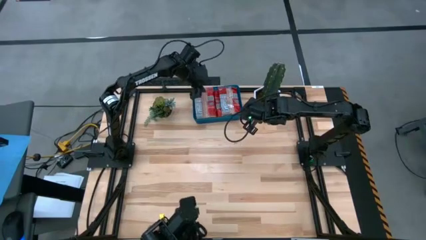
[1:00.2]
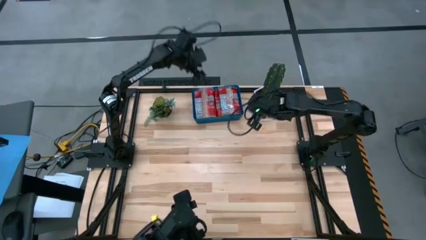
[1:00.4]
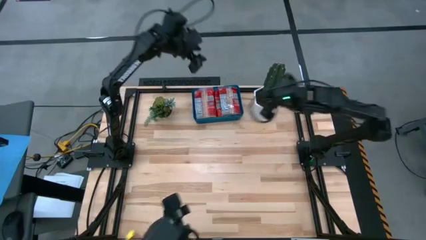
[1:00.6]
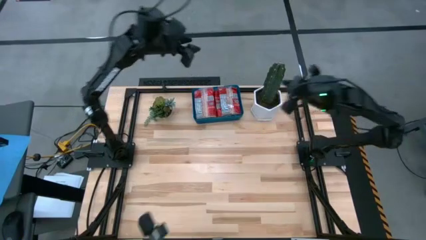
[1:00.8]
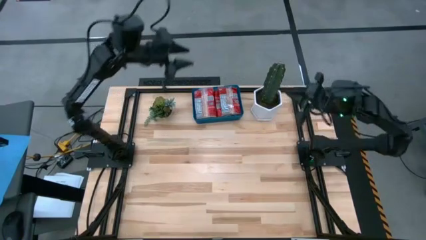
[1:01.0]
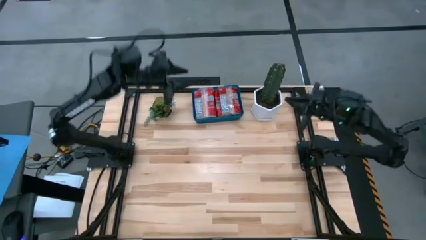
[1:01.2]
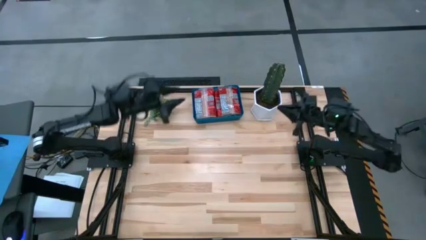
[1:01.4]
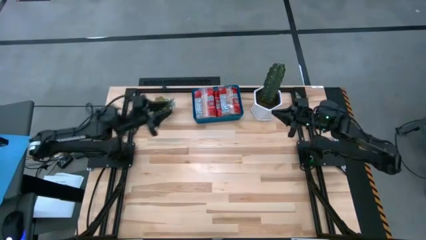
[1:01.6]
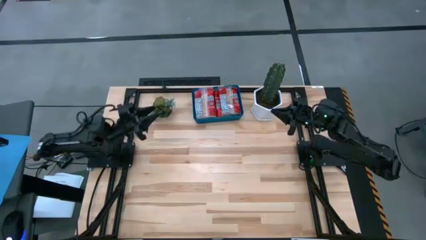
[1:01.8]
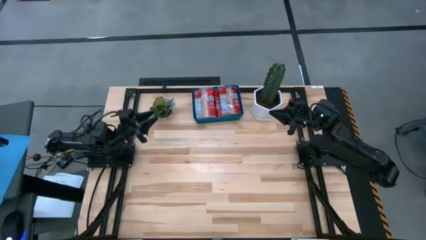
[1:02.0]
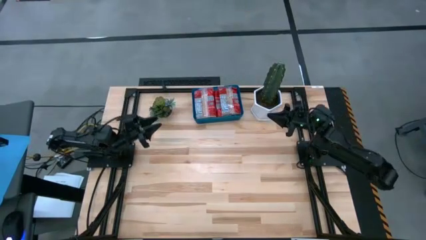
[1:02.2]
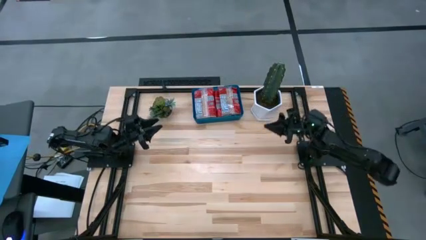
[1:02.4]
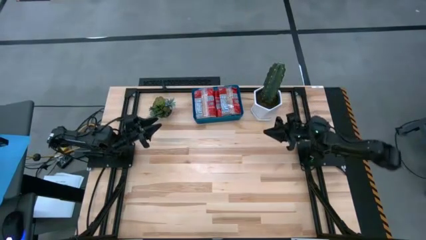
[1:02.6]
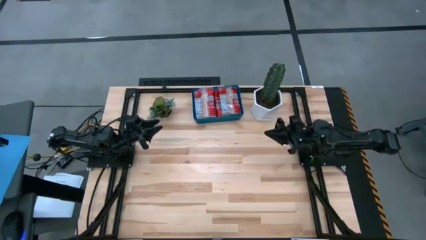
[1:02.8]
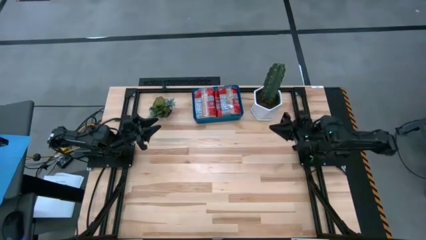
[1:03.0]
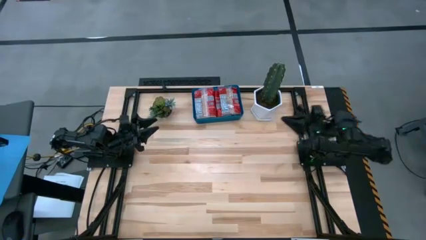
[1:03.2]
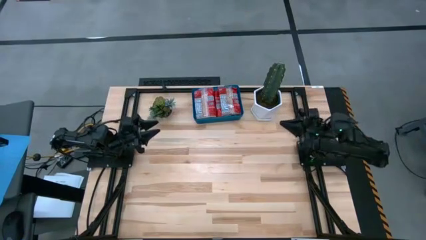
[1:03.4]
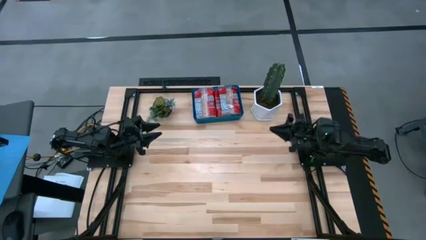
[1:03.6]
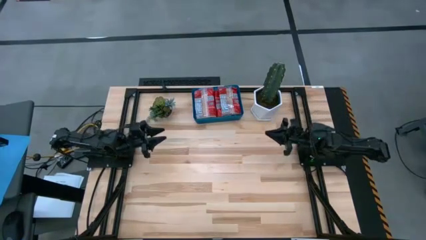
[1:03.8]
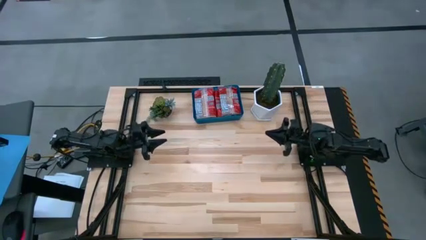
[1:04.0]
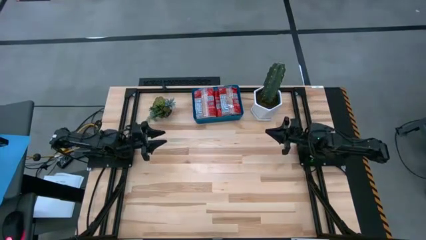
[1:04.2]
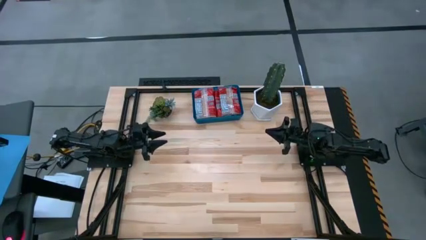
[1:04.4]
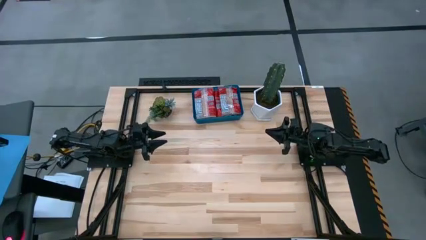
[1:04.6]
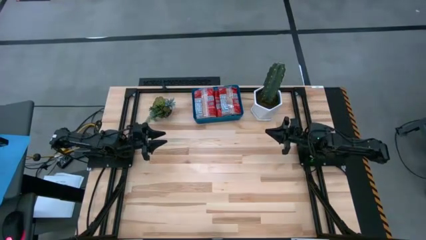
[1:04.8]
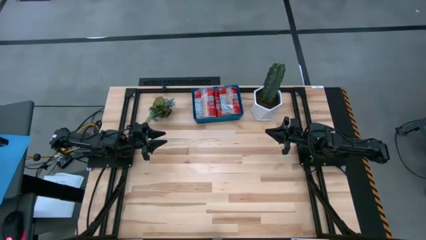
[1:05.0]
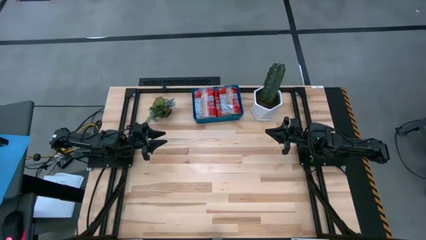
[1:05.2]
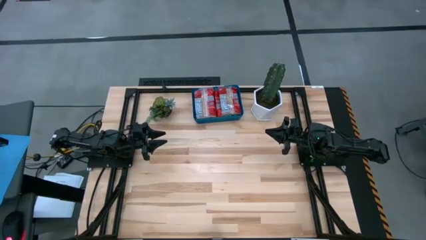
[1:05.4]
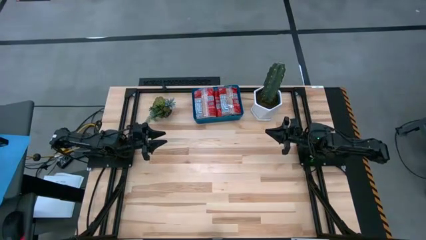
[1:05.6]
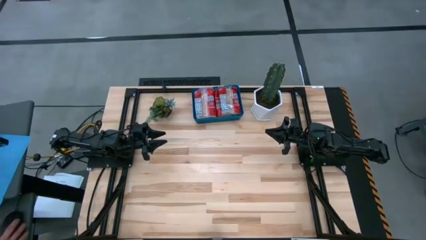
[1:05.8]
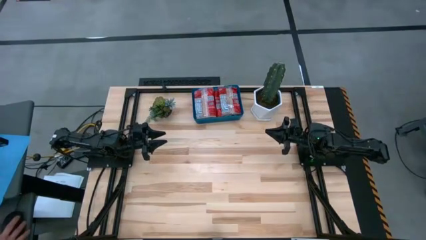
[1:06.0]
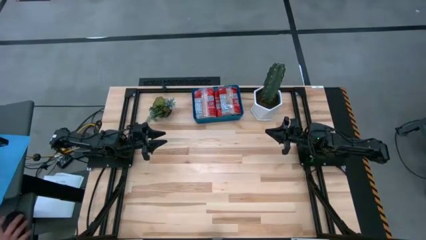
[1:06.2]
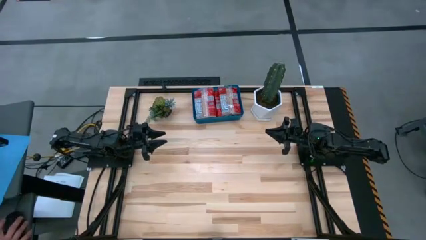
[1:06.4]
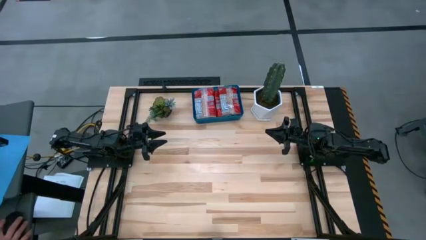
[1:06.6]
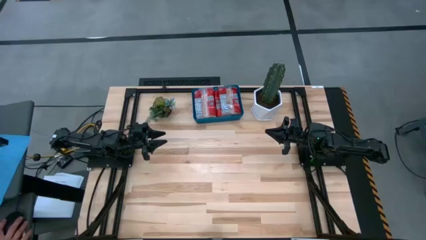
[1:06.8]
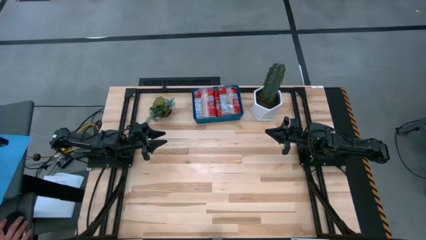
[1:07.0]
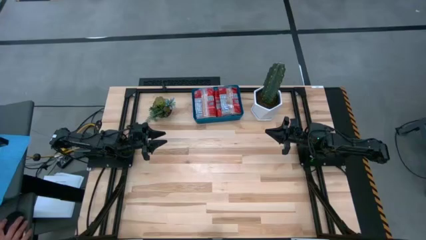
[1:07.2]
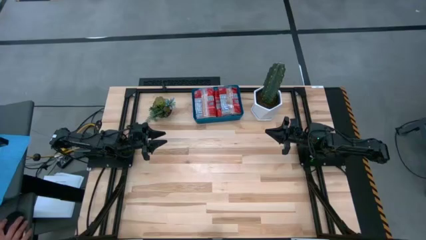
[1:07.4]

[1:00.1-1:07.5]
Task: Sort popcorn bags into baskets
Return to Home Position

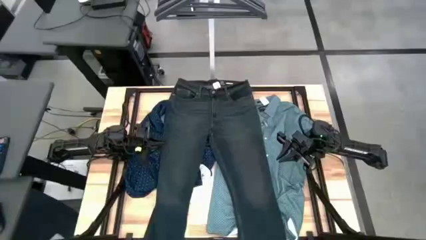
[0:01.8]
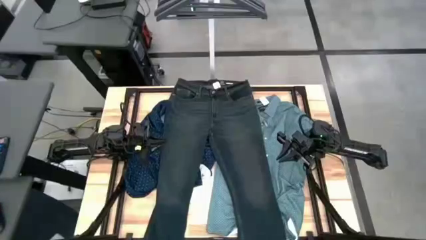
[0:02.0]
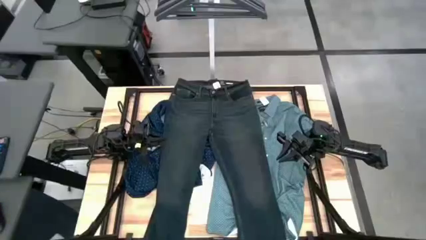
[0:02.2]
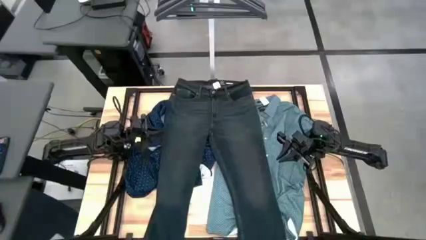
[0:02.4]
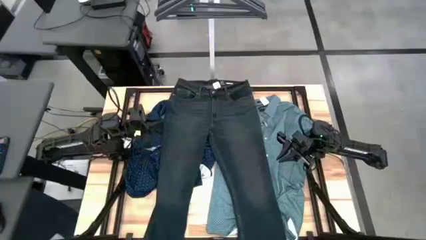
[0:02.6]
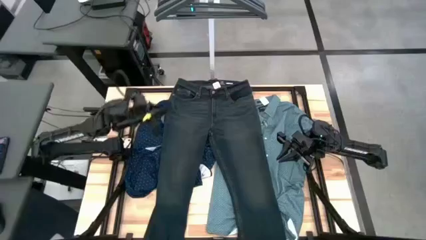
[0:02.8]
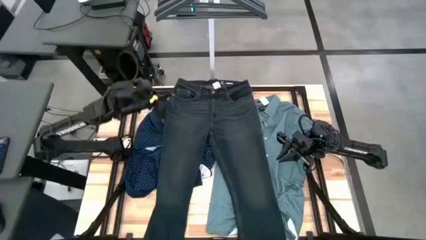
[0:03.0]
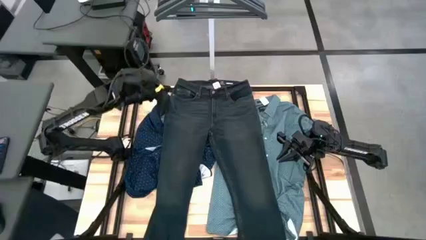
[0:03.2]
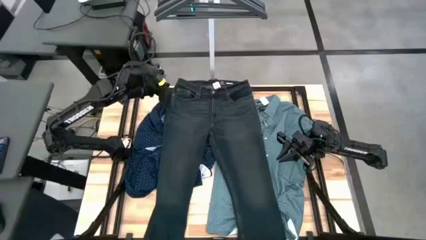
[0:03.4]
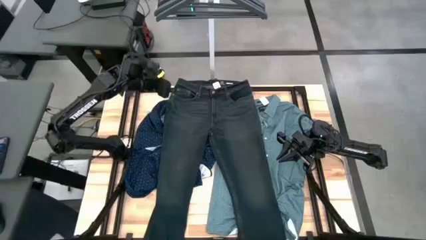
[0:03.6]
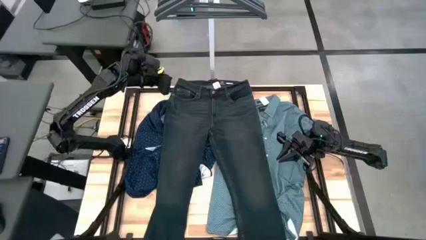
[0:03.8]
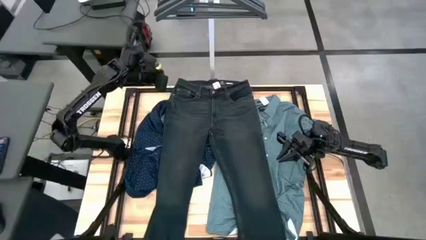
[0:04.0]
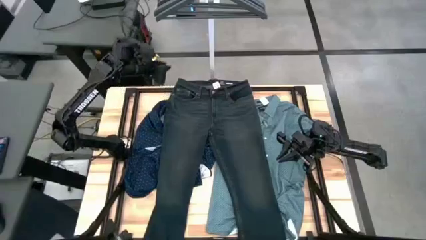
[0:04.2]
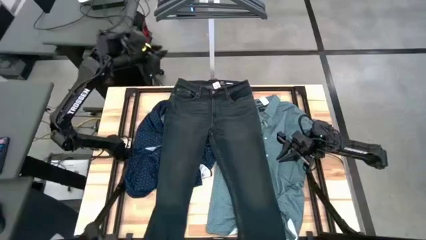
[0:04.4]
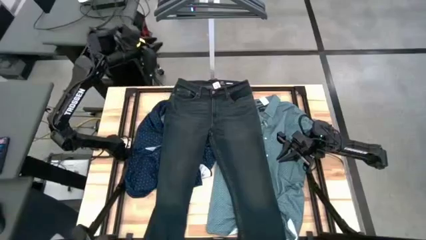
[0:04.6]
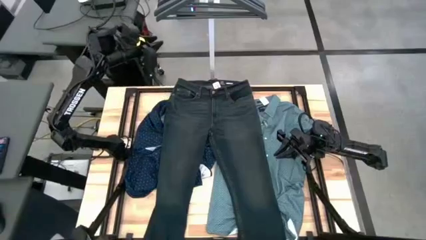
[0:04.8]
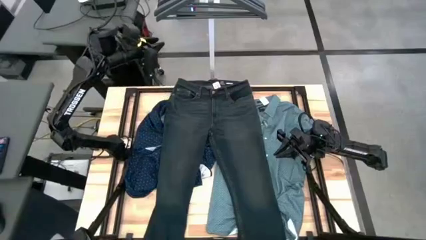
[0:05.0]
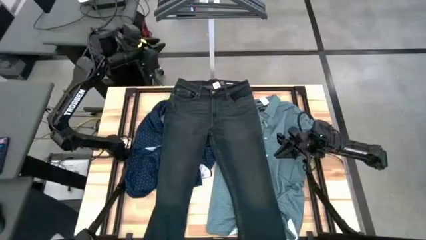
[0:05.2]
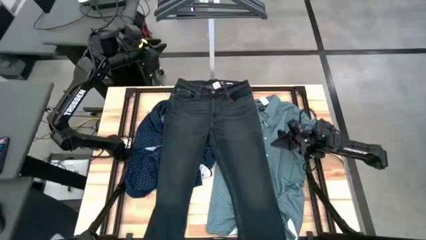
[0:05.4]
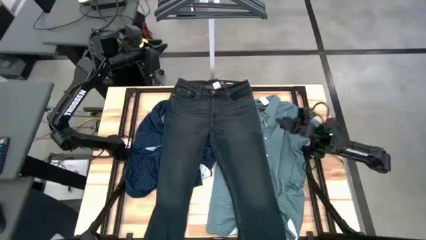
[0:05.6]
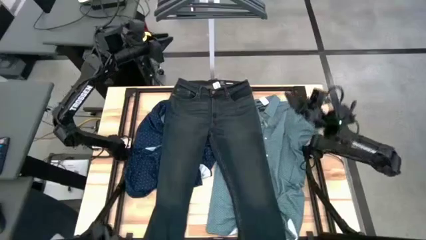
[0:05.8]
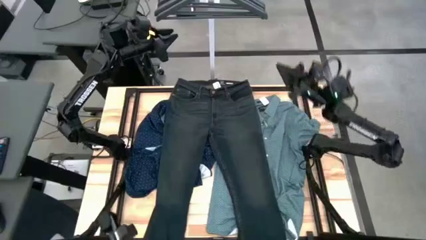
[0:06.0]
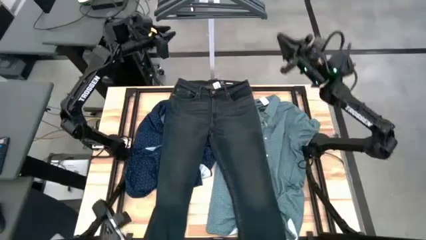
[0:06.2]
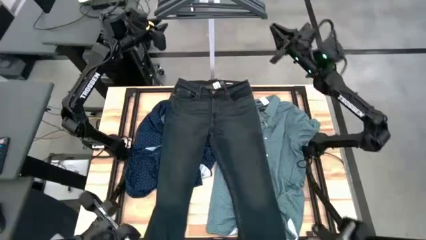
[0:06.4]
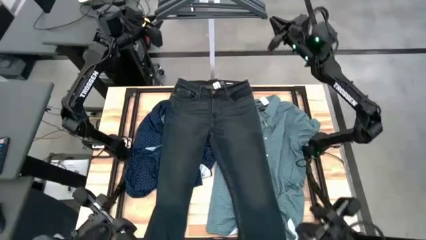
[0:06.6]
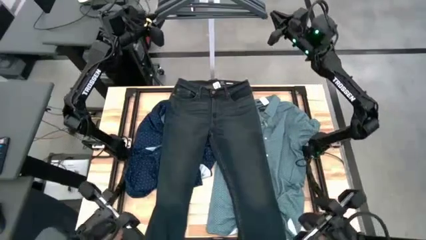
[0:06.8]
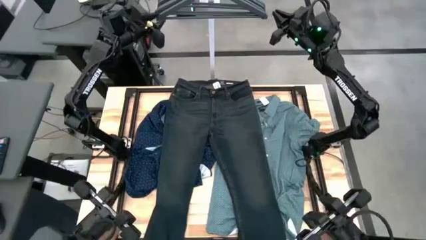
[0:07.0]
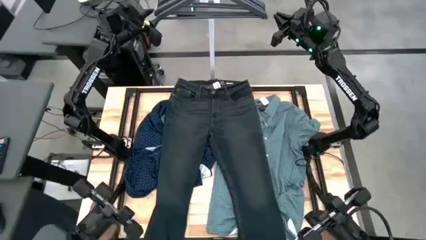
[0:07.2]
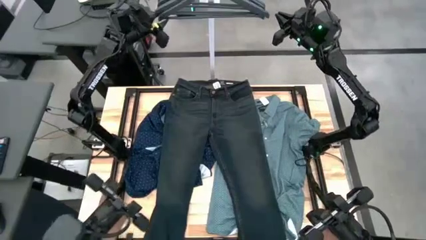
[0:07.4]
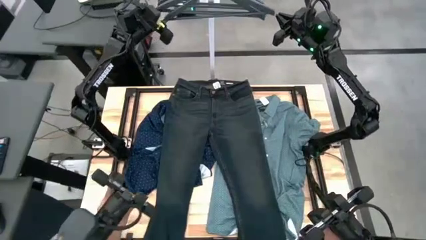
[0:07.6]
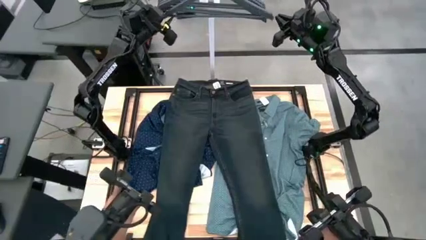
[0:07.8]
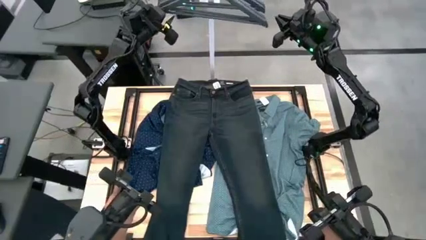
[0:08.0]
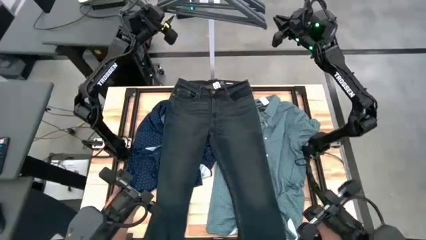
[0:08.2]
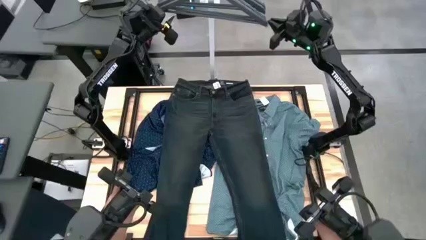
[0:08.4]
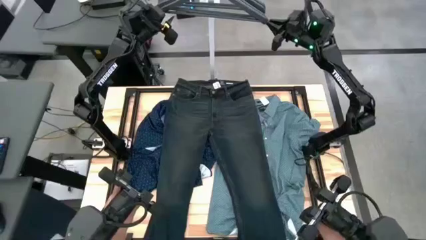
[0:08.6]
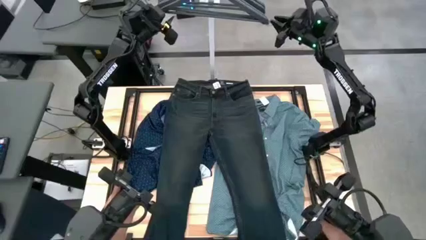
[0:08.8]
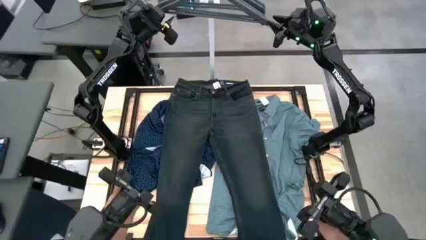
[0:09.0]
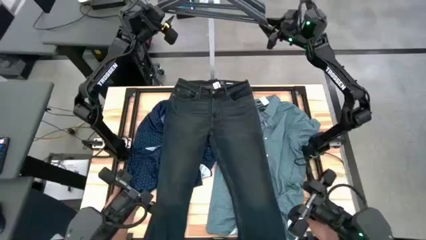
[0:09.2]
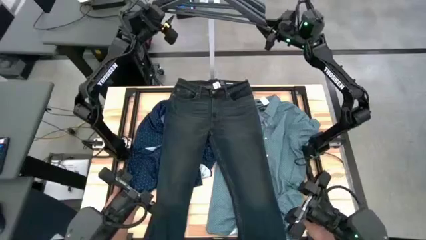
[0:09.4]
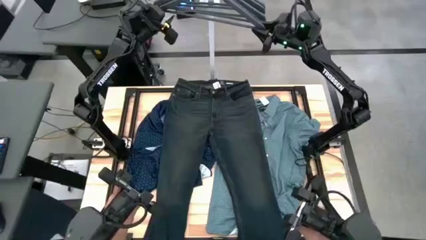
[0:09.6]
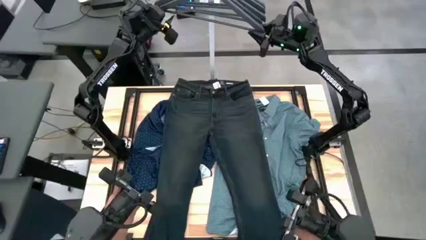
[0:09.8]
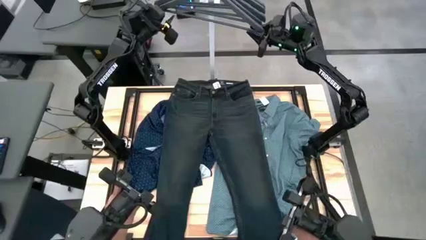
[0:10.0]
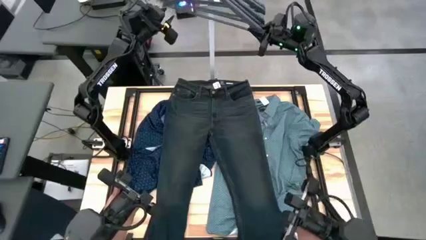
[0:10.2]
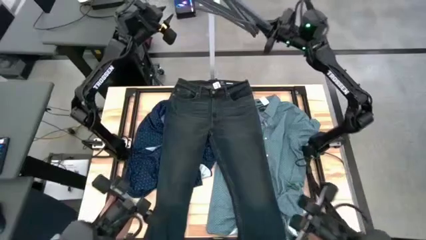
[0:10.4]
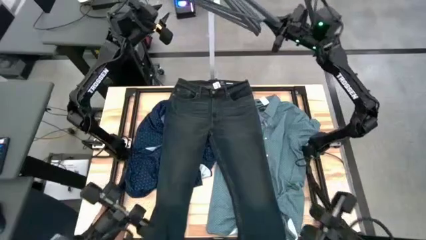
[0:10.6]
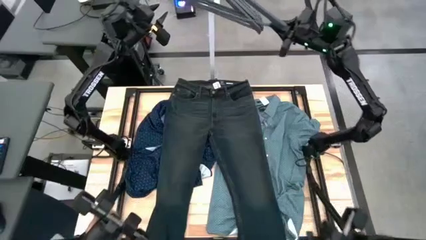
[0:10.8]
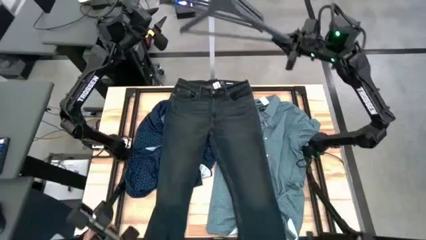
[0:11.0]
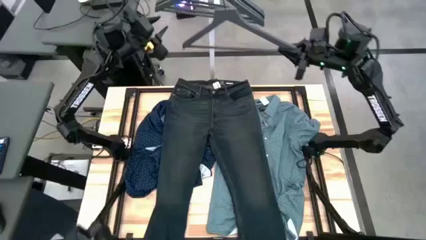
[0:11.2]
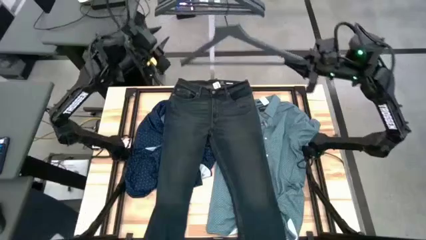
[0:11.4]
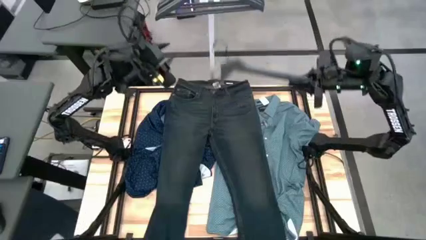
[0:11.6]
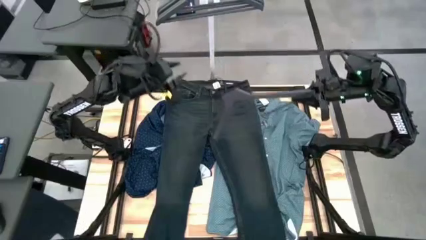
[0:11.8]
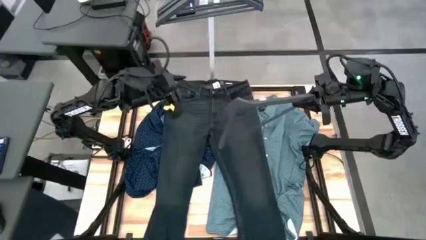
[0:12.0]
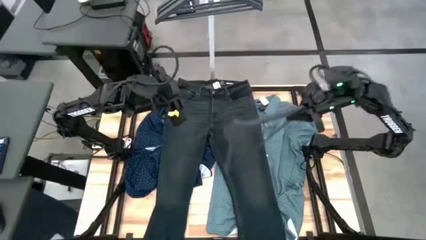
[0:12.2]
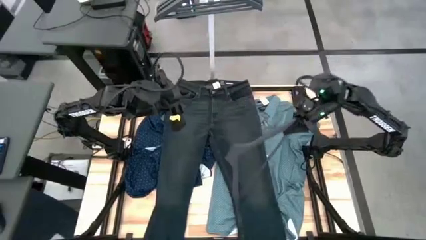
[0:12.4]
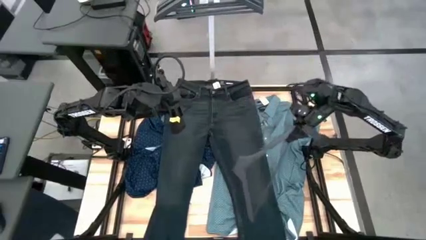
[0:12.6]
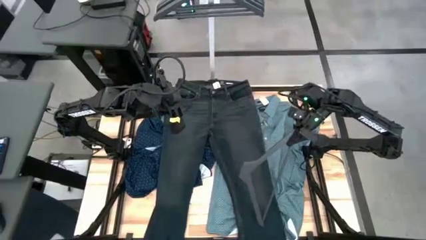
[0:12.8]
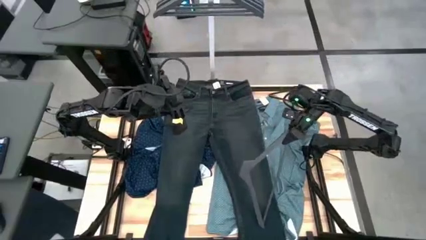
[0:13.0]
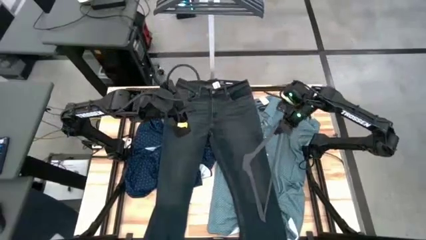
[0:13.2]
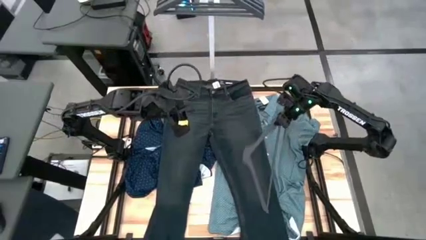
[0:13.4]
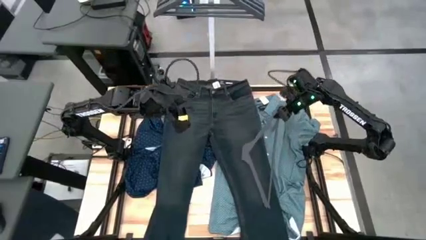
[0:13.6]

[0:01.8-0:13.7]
Task: Hang clothes
Remove the gray hanger from the rack
